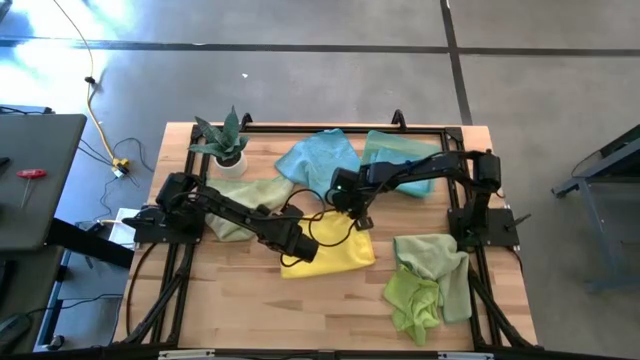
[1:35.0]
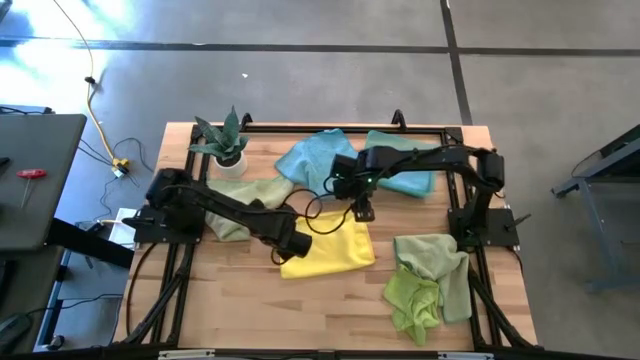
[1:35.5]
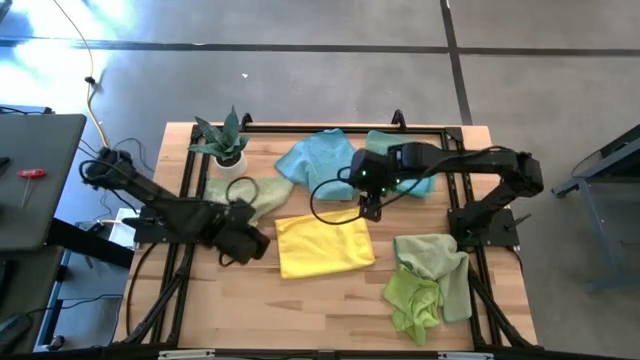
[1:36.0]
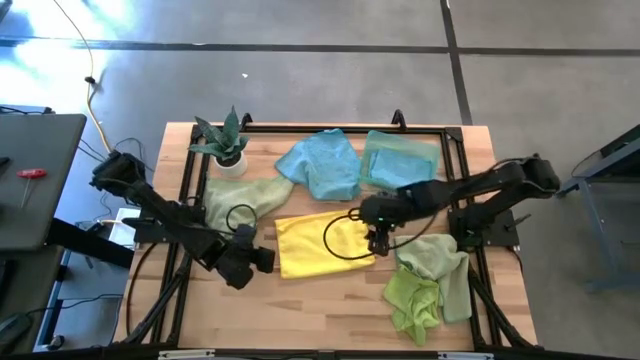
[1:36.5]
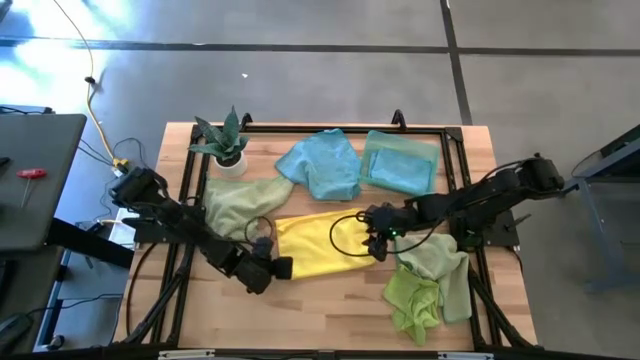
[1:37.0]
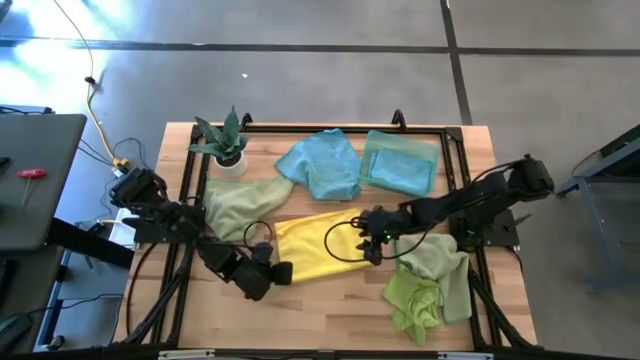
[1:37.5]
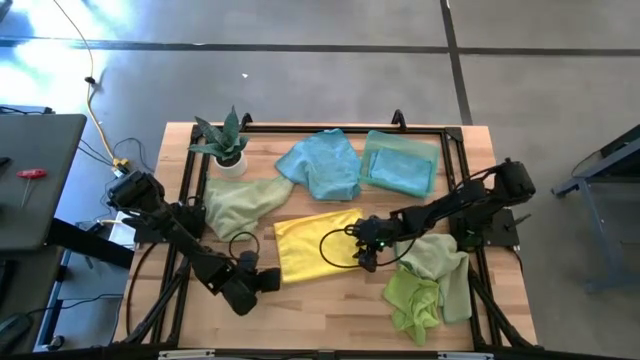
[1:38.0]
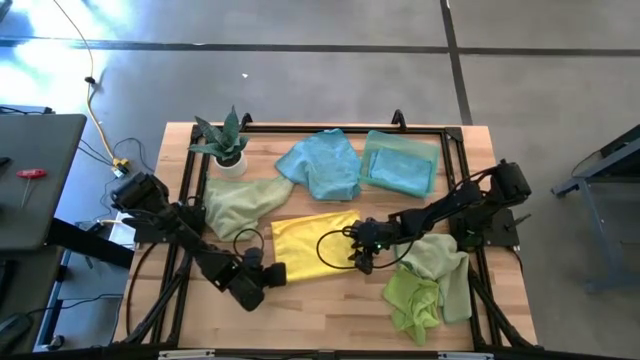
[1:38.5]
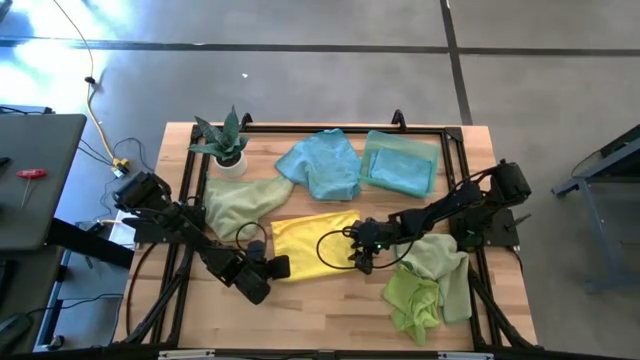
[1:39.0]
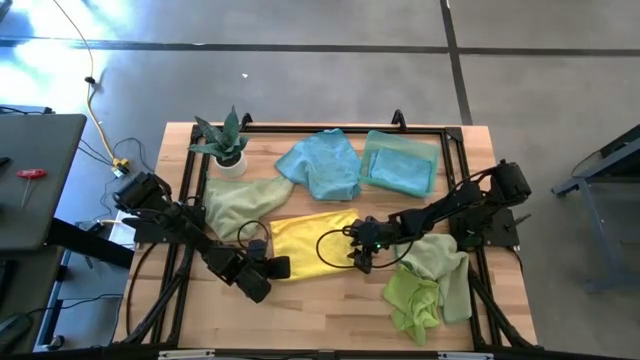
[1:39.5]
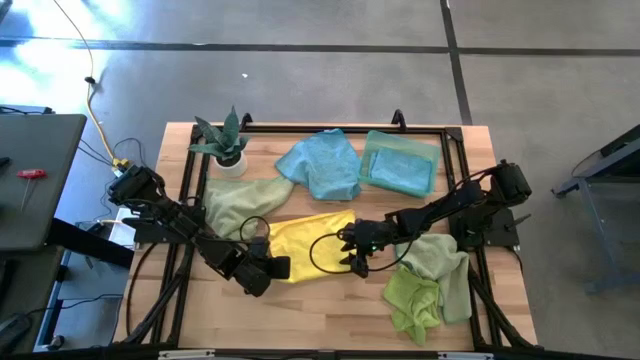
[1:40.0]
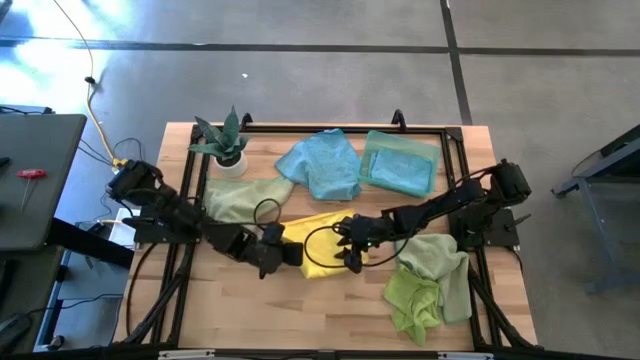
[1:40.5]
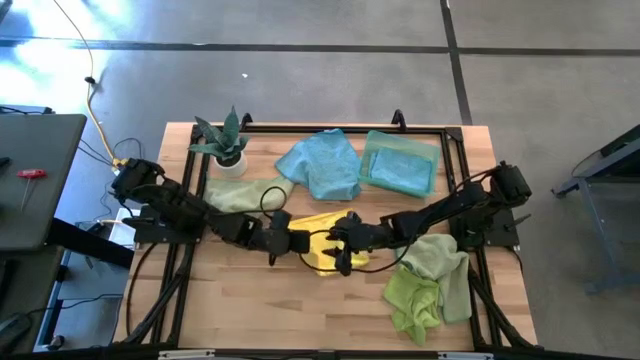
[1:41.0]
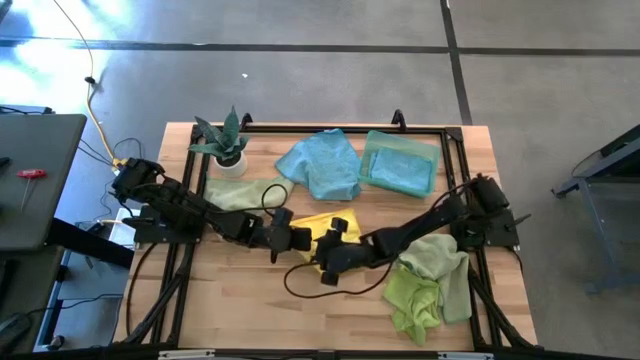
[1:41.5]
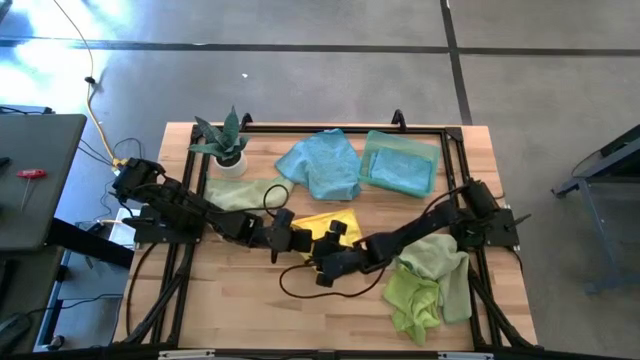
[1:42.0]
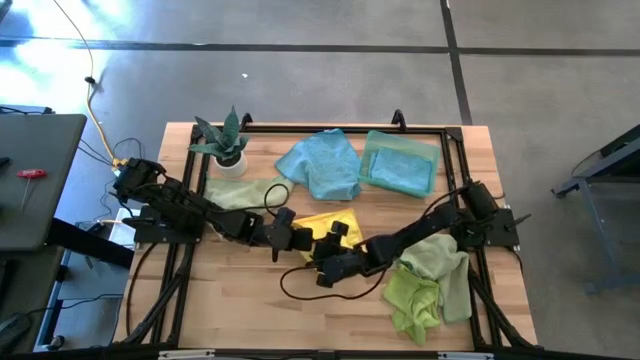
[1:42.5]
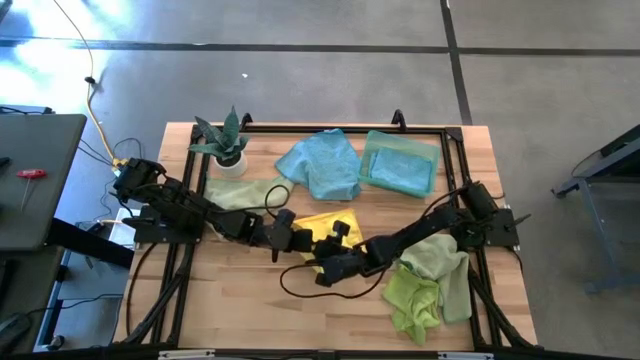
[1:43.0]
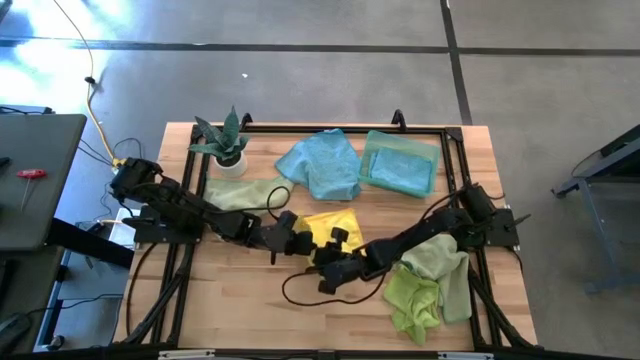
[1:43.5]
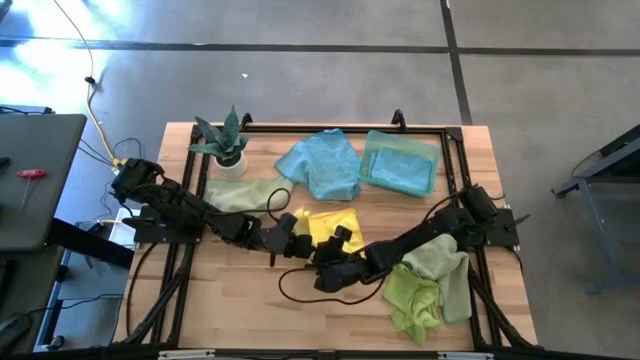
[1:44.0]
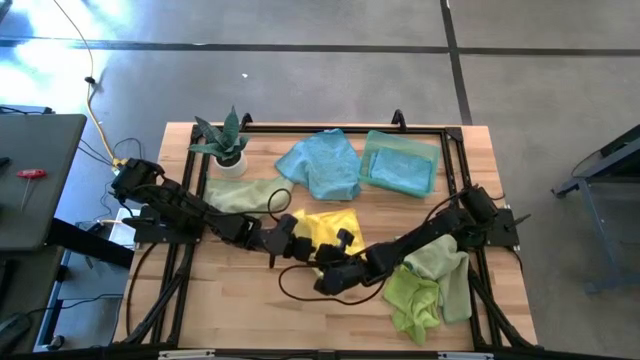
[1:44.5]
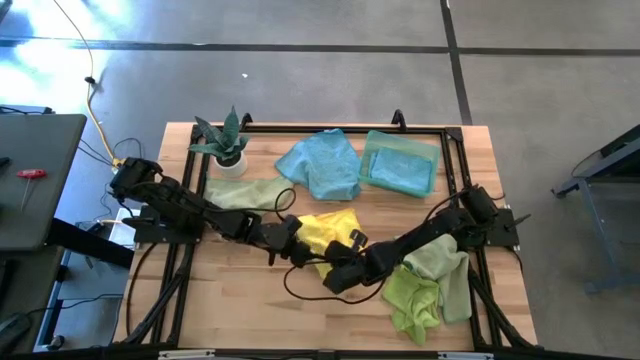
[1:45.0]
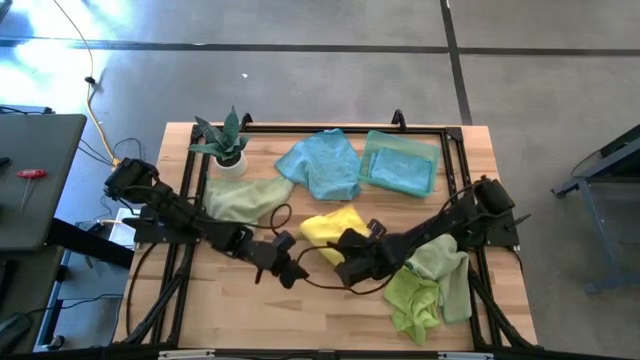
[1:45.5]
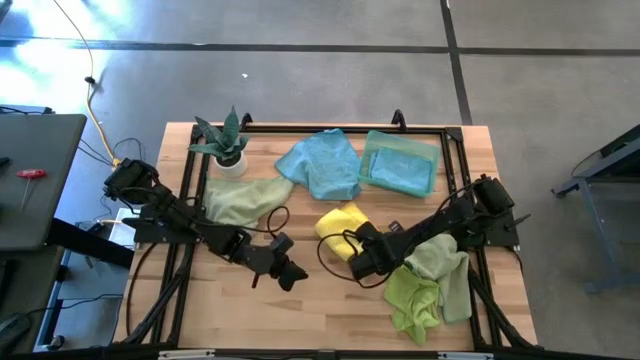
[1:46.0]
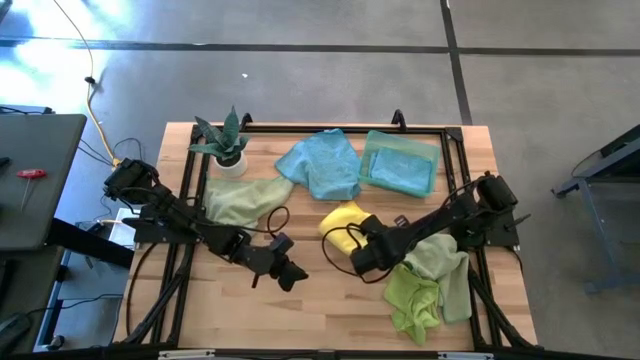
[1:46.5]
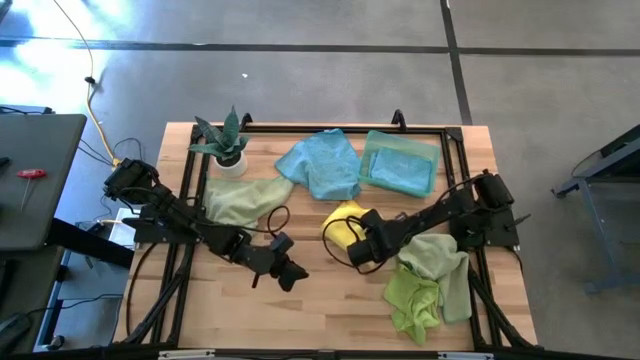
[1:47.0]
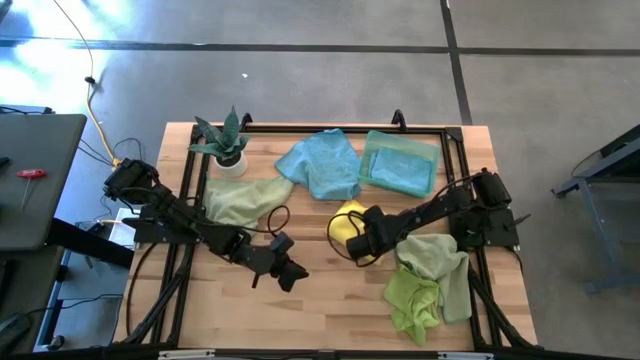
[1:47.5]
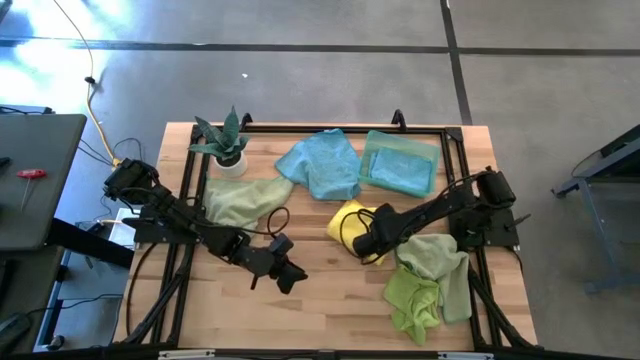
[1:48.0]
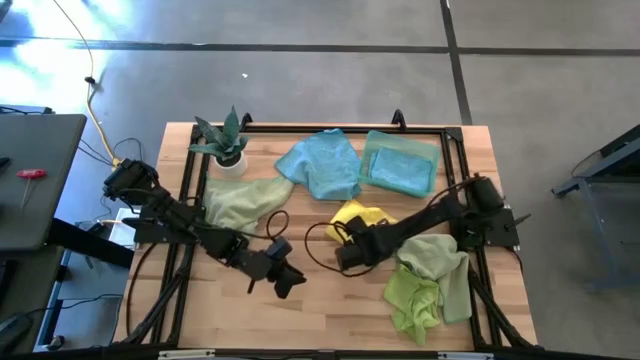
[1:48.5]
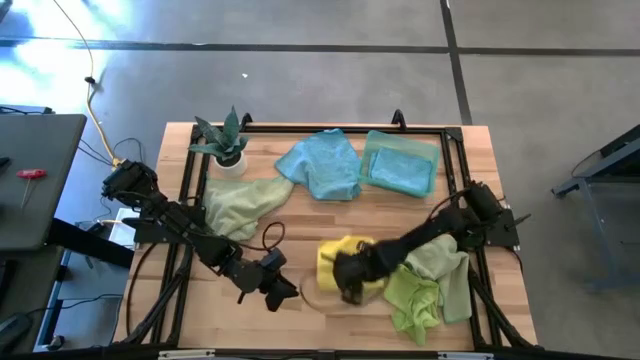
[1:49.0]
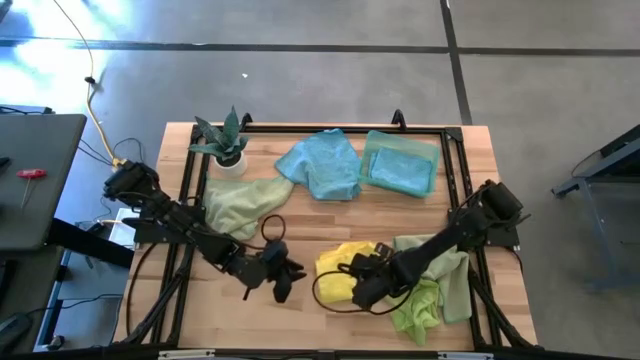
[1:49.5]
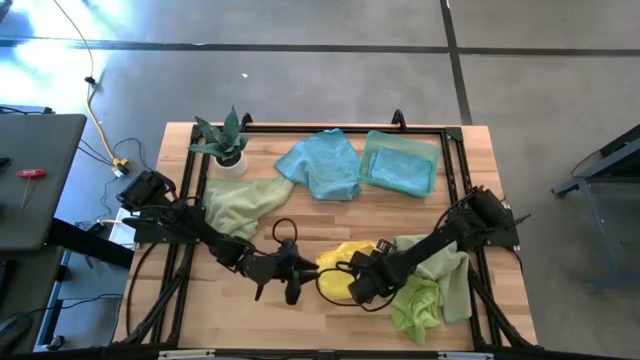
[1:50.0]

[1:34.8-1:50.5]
Task: Fold microfiber towels
Fold the yellow microfiber cloth

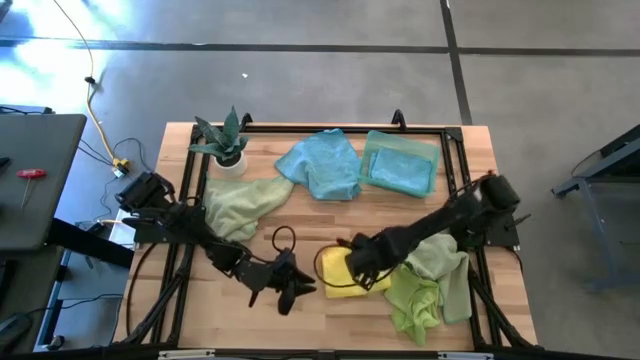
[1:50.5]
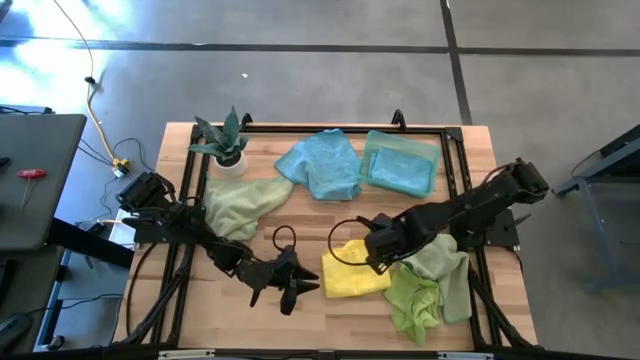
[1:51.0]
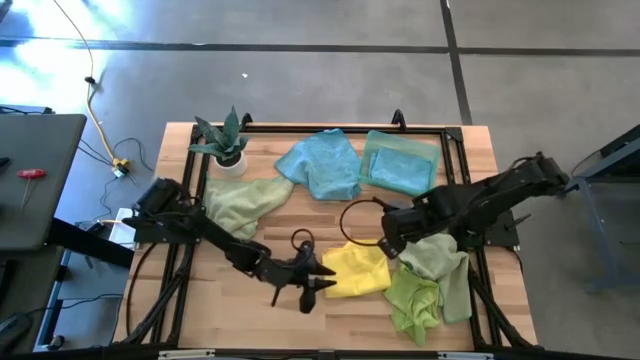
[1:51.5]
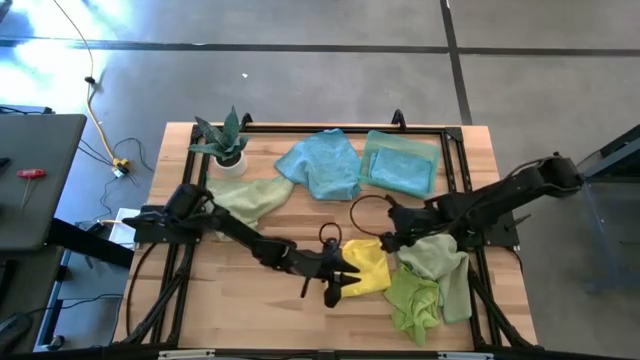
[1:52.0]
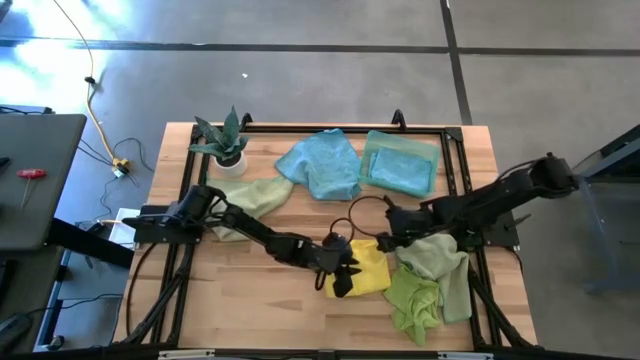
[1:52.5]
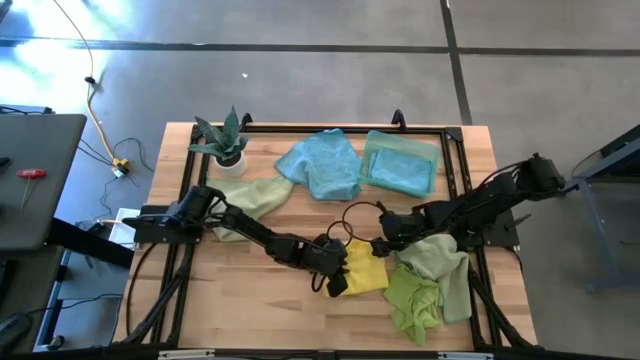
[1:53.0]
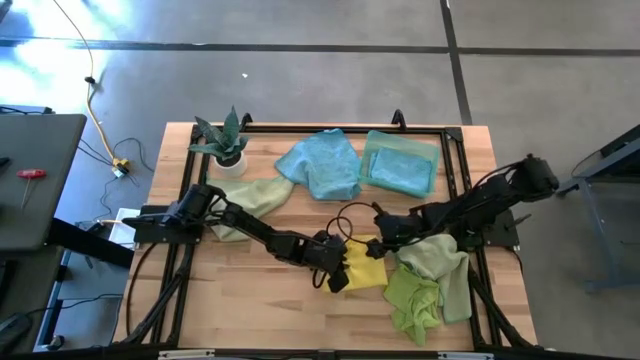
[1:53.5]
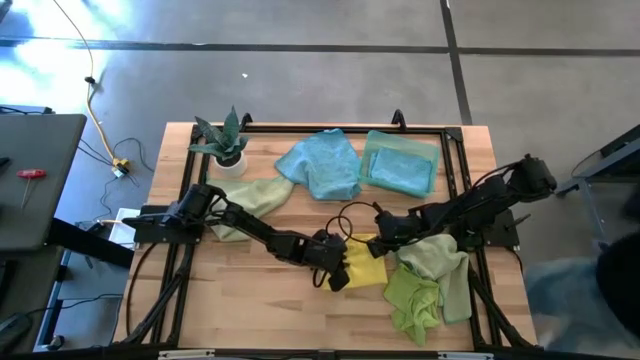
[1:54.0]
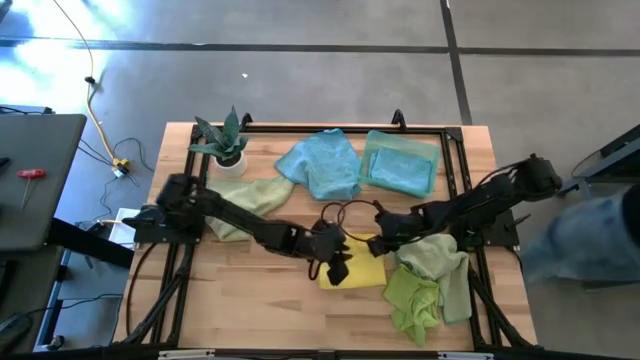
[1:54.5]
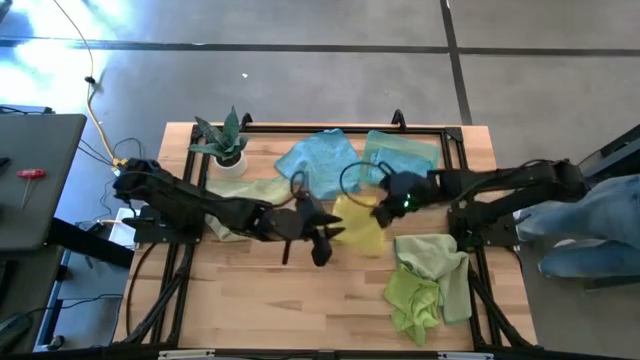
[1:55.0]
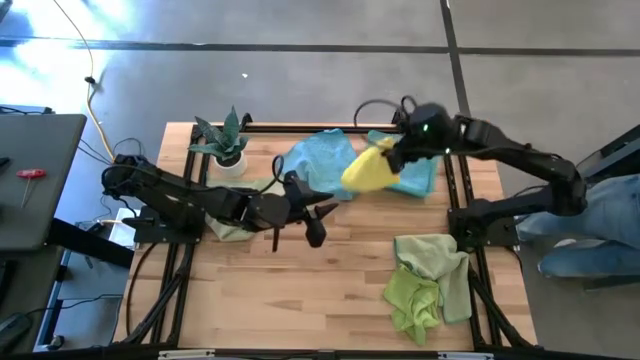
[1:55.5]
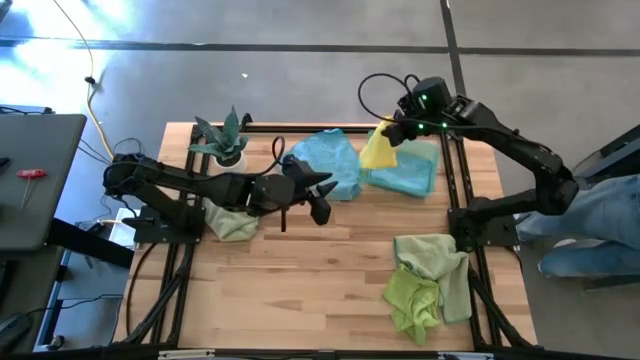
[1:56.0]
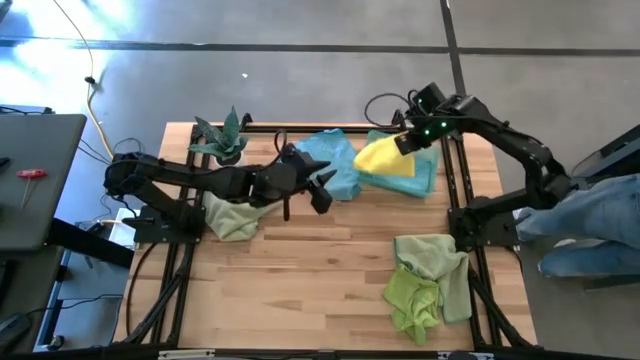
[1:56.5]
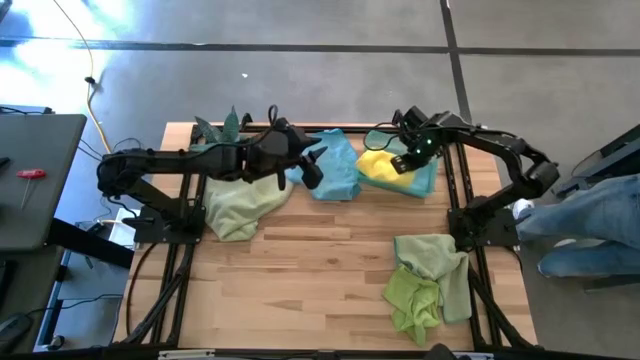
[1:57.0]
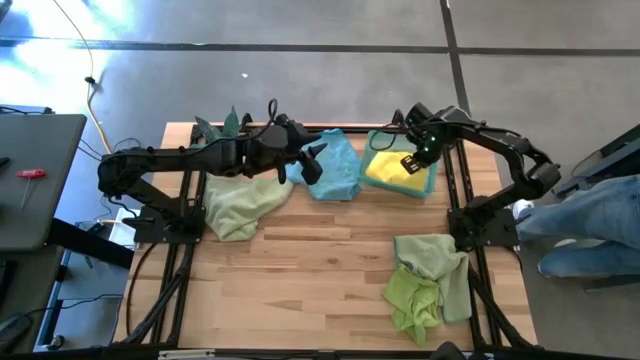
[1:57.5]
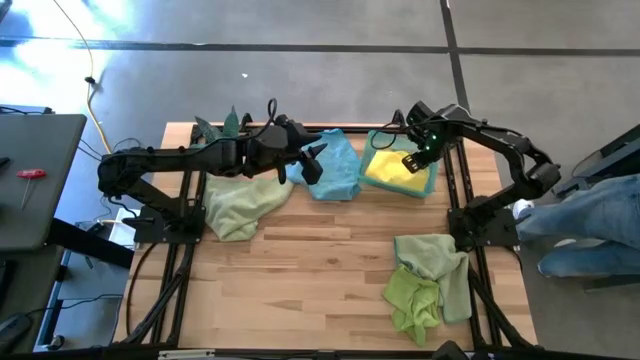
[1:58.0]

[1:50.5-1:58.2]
Stack the folded yellow microfiber cloth on top of the folded blue microfiber cloth
